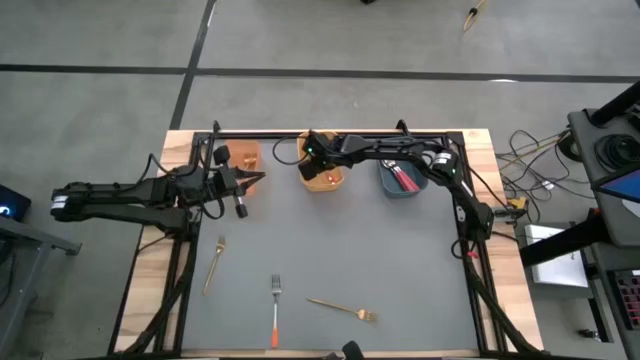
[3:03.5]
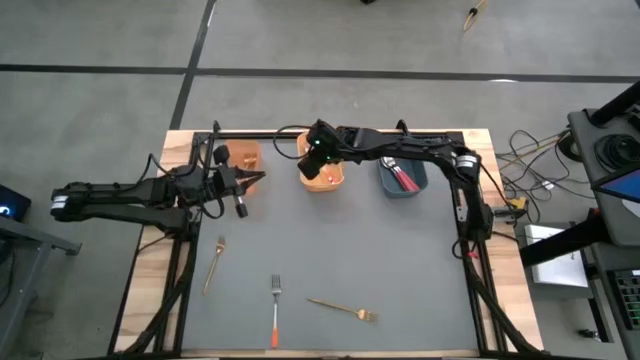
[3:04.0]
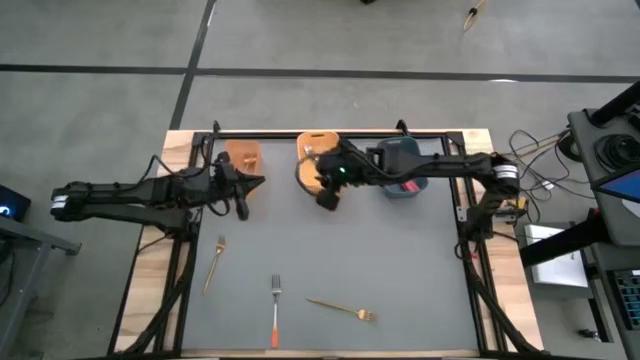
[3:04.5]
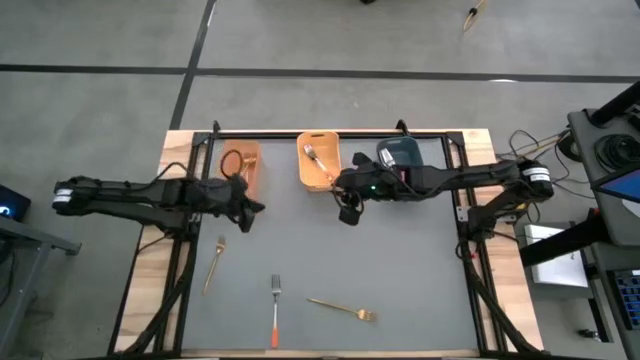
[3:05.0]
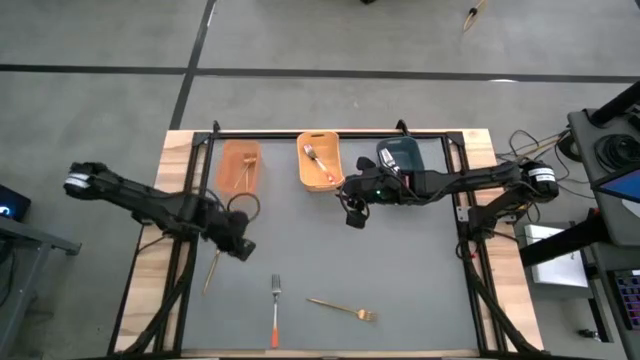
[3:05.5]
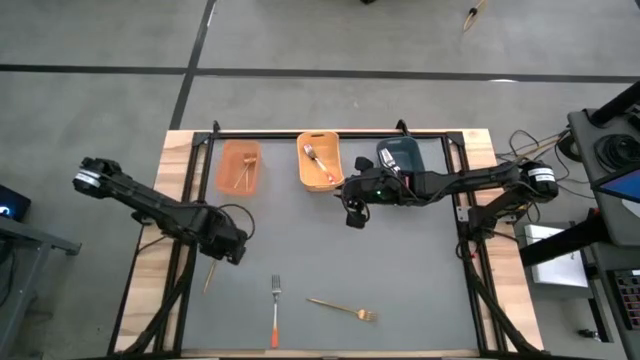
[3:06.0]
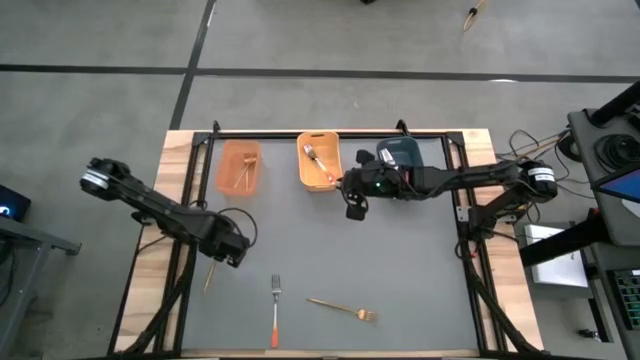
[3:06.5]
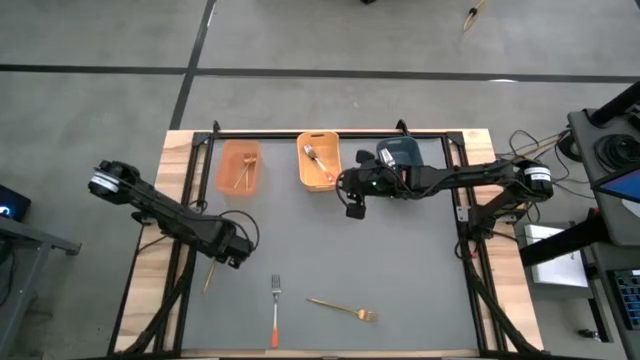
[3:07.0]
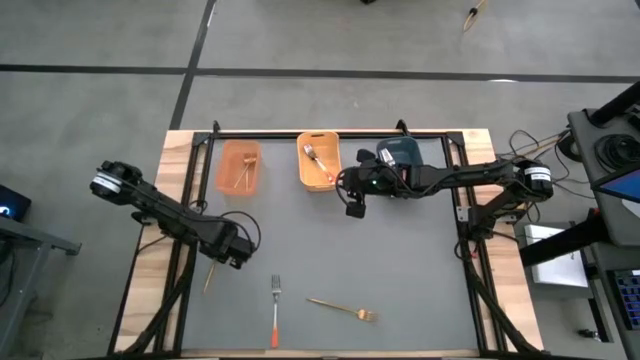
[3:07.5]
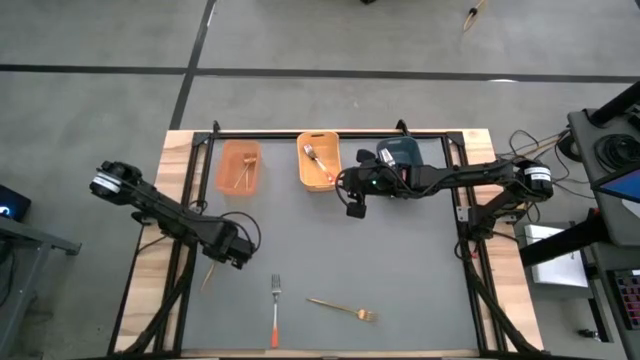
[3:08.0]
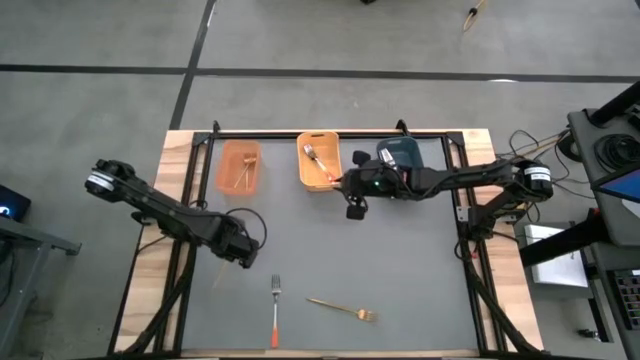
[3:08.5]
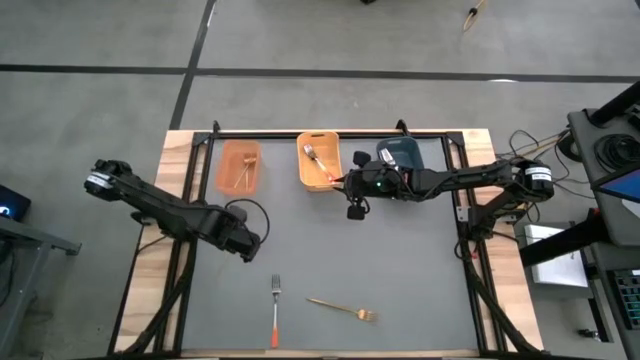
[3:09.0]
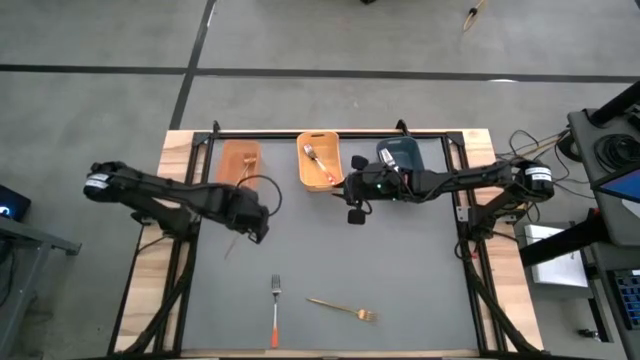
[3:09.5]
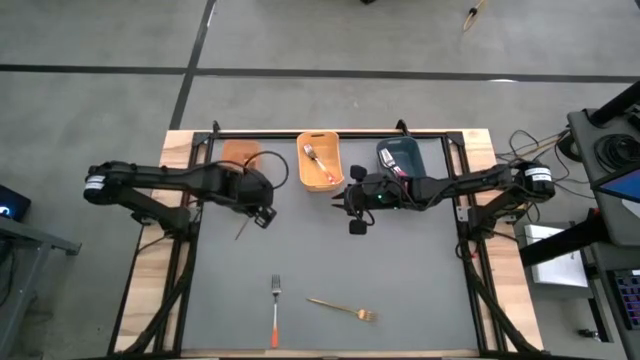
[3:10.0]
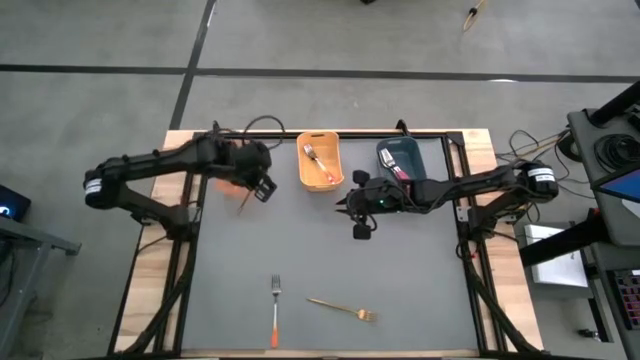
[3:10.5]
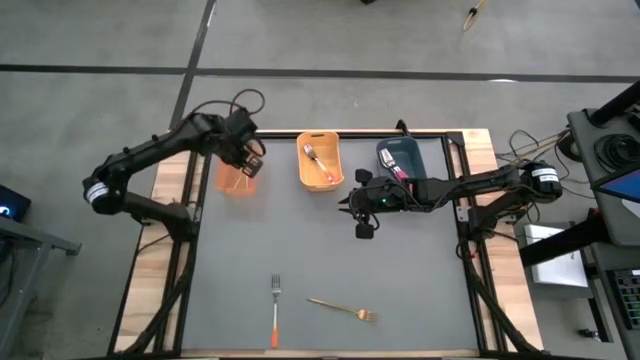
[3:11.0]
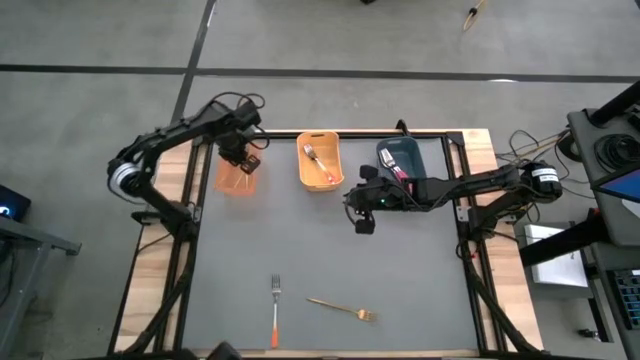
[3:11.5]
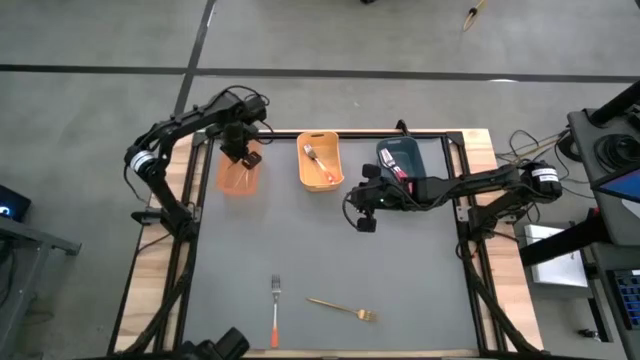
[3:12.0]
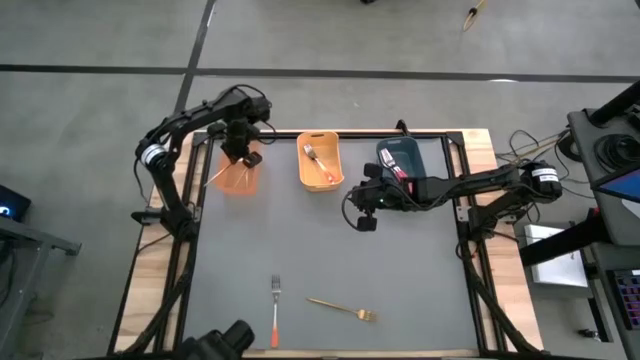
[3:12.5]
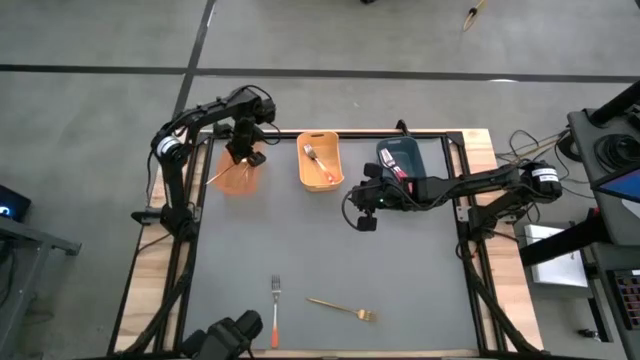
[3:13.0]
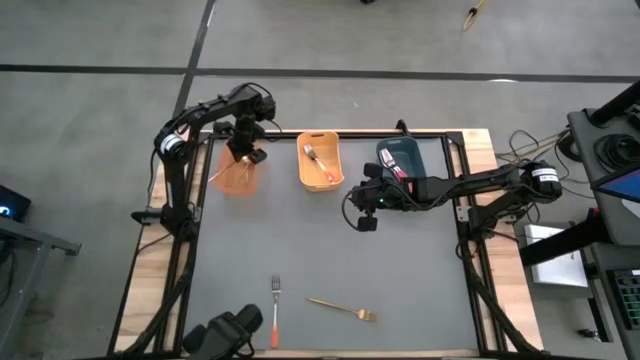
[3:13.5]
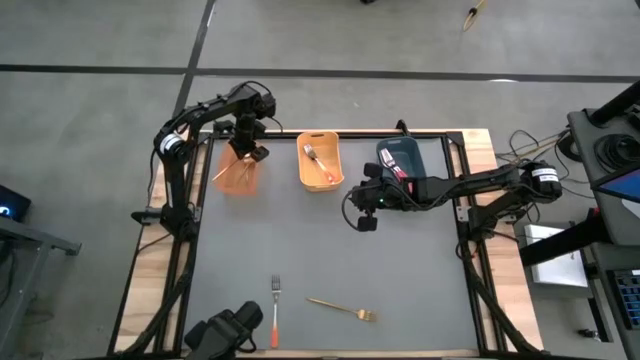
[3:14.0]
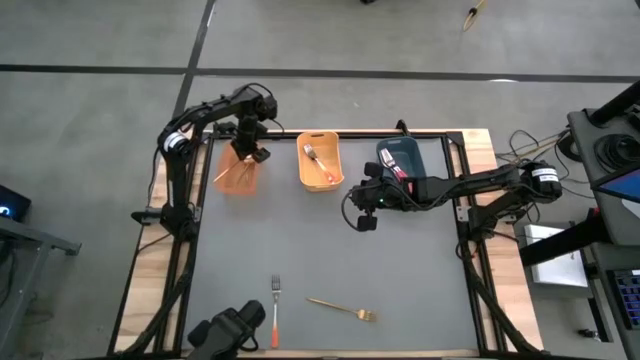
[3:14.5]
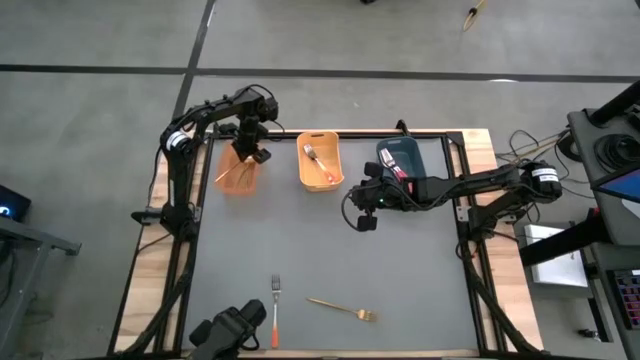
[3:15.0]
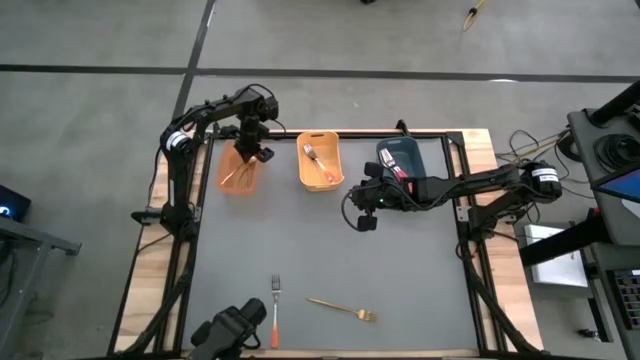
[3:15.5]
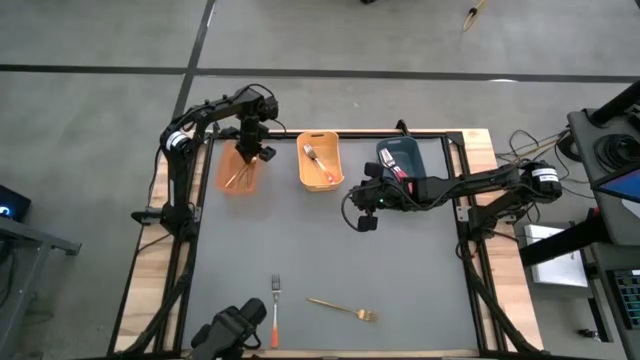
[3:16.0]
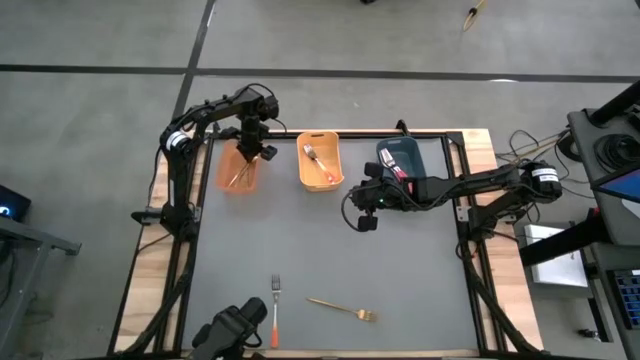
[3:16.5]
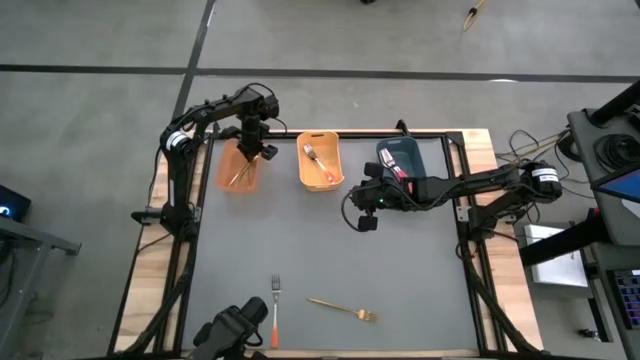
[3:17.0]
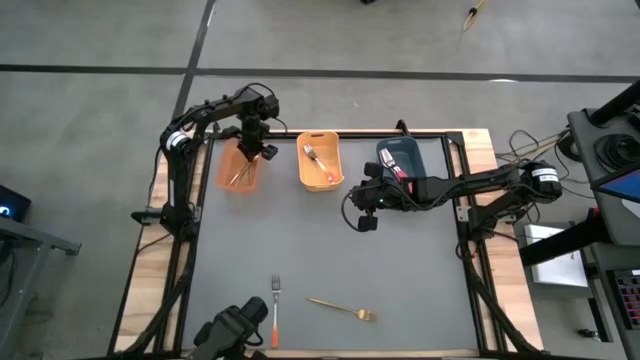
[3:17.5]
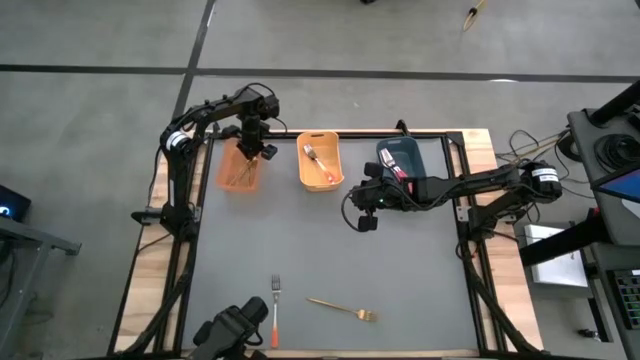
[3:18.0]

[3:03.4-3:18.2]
Task: Sort silverware by color (type)
Put the gold fork into the orange bin

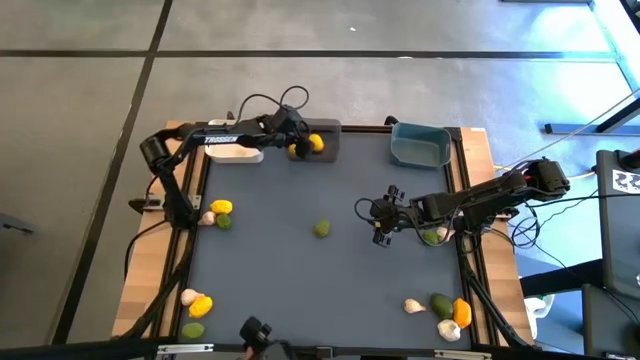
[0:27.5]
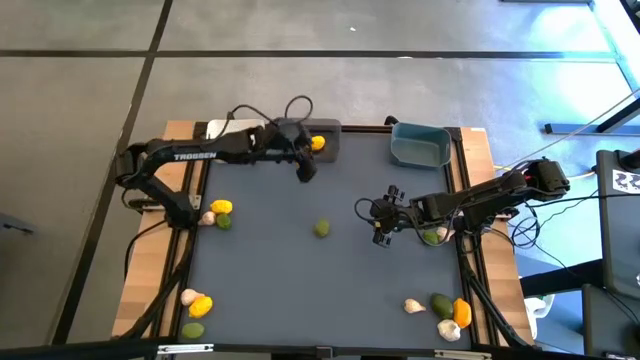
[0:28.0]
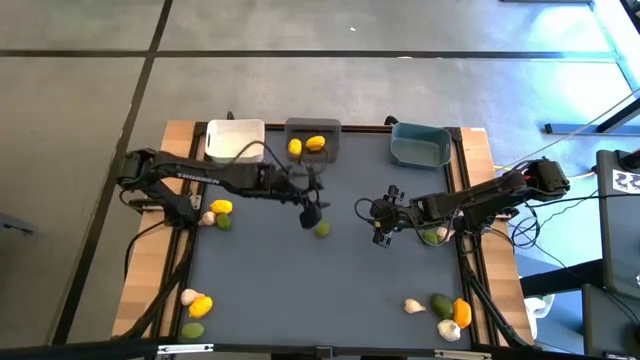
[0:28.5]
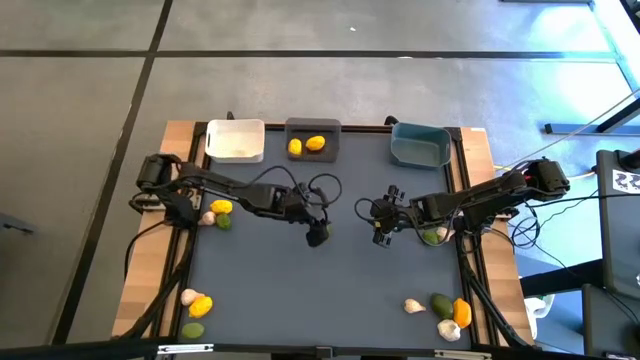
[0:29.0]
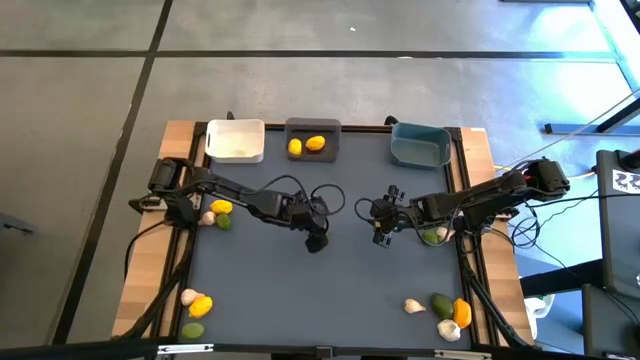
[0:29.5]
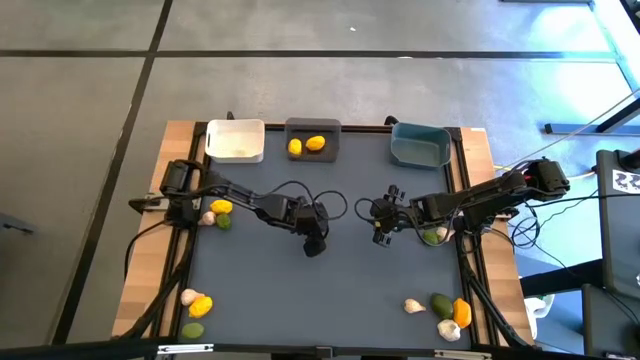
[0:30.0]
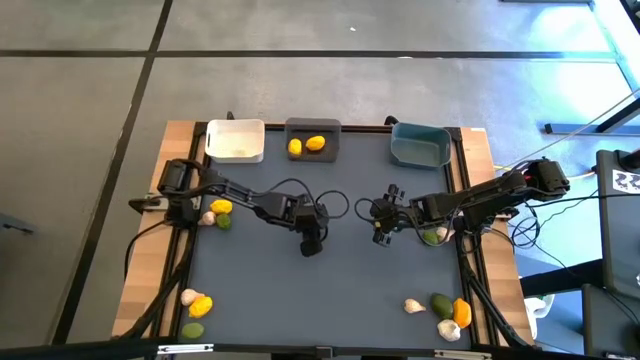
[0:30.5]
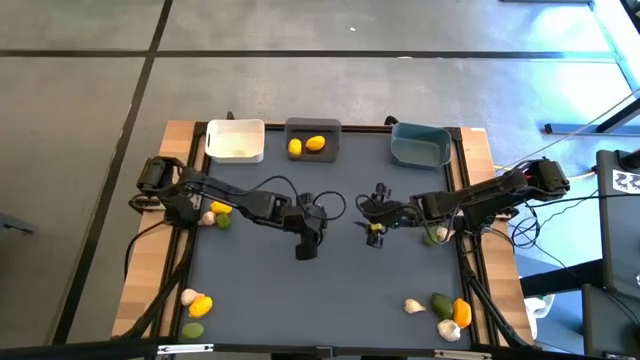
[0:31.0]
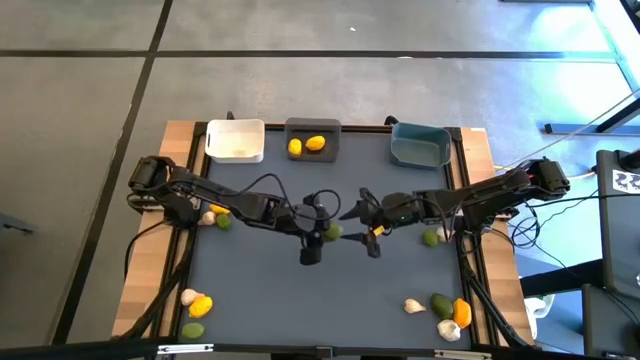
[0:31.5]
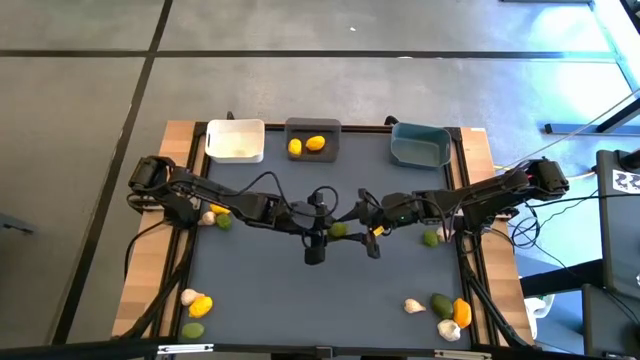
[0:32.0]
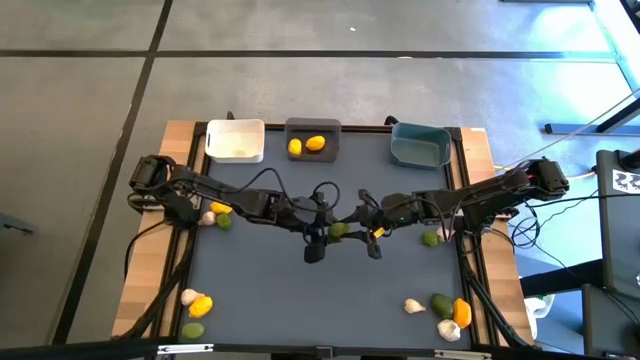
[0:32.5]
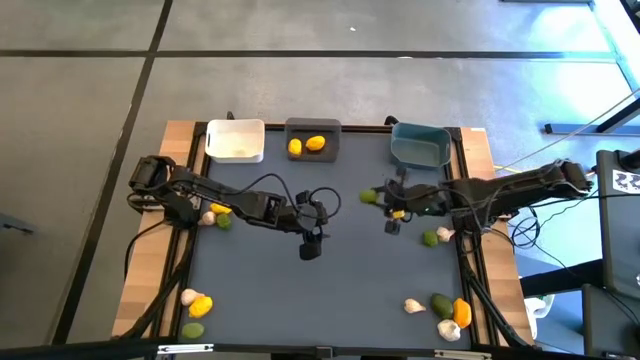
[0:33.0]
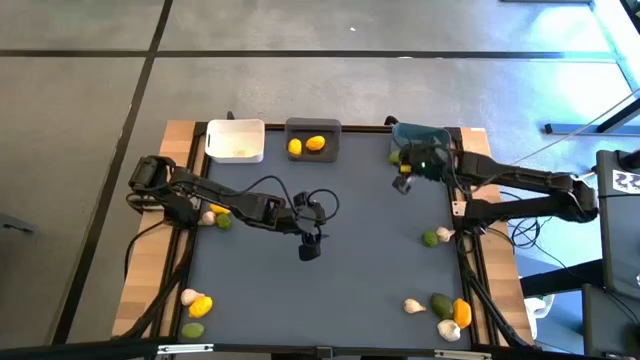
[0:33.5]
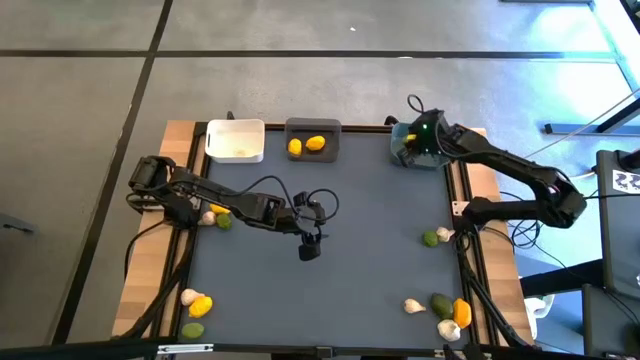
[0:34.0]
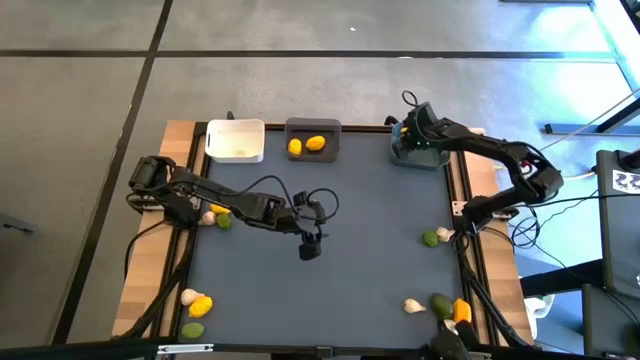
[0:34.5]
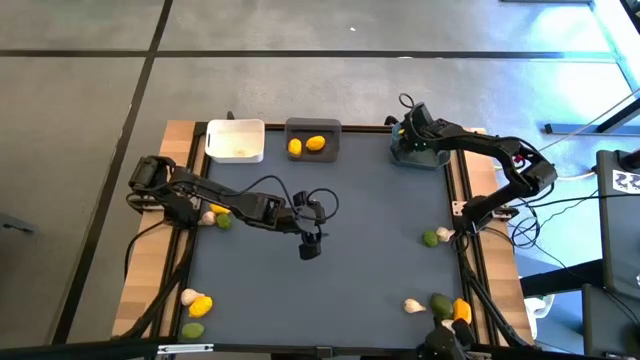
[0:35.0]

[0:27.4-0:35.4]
Task: Sort produce into baskets
Put the lime into the blue bin
